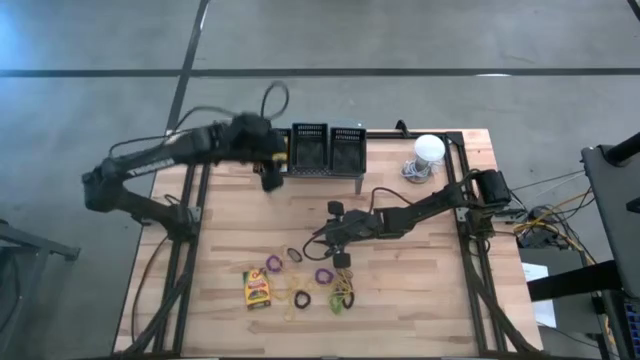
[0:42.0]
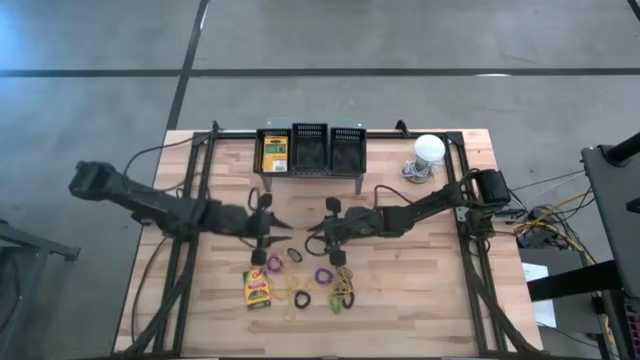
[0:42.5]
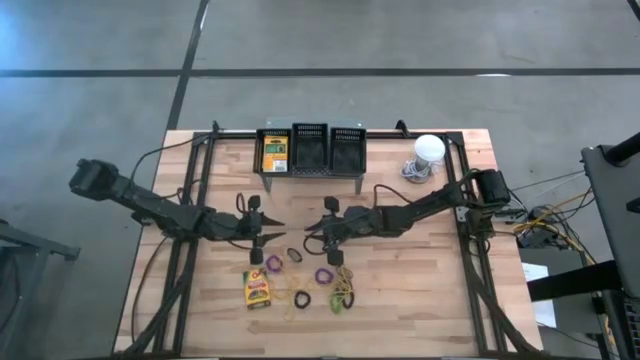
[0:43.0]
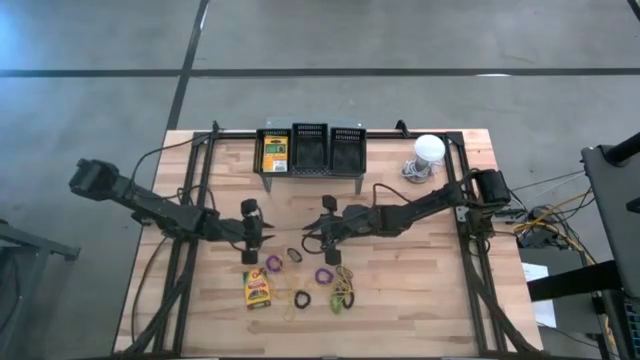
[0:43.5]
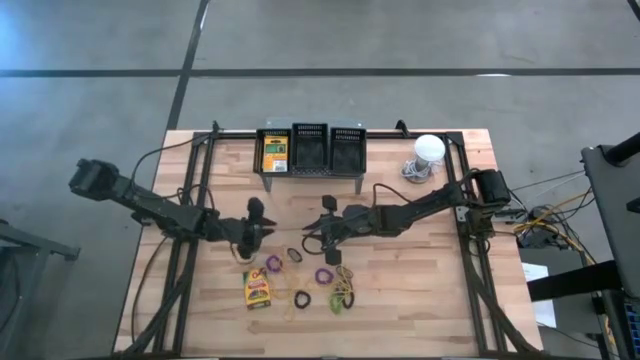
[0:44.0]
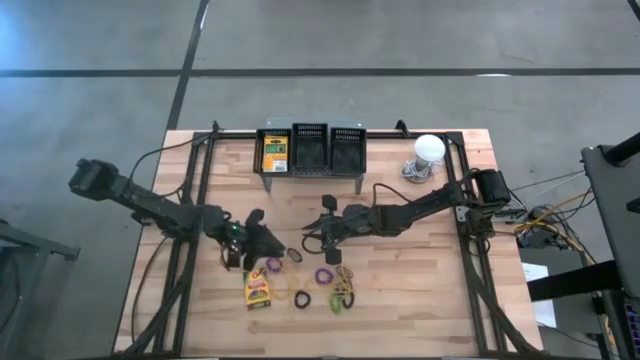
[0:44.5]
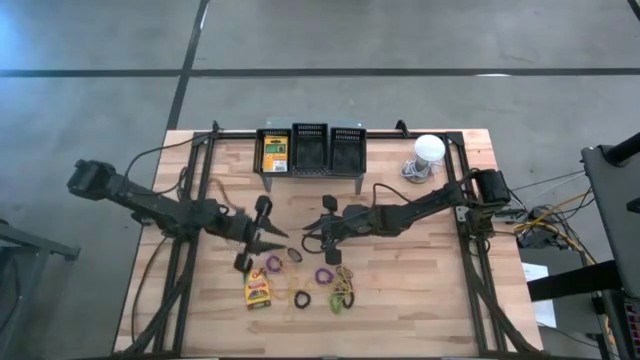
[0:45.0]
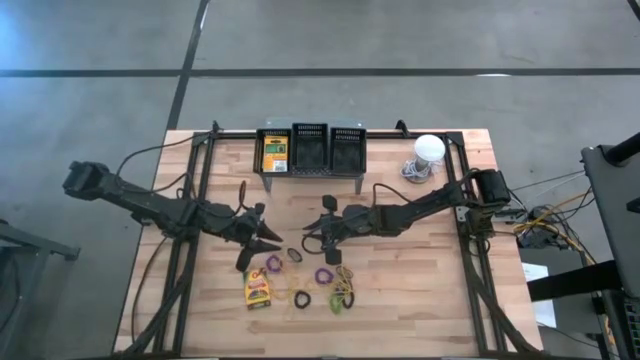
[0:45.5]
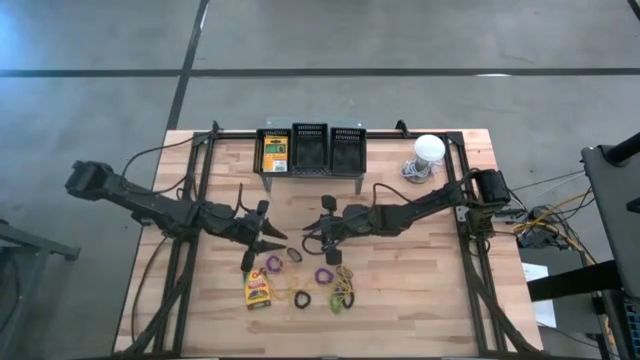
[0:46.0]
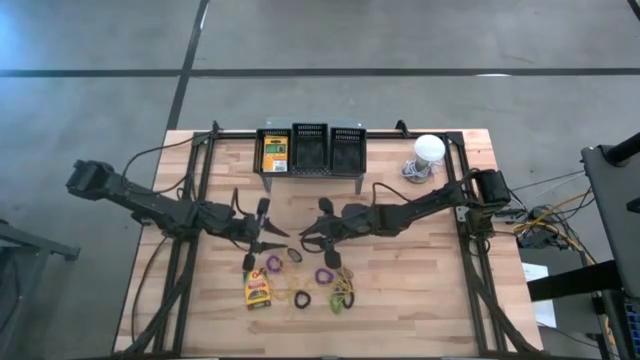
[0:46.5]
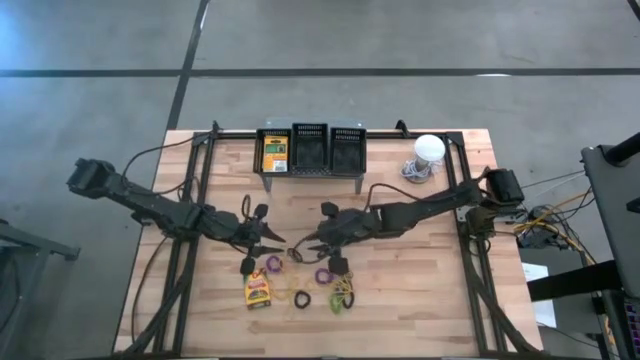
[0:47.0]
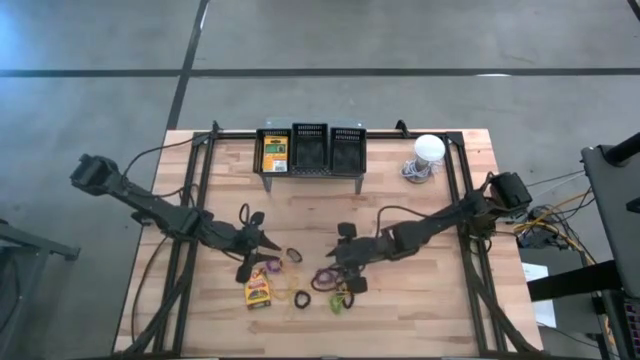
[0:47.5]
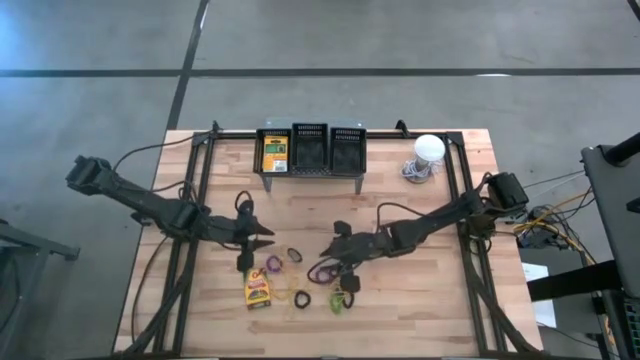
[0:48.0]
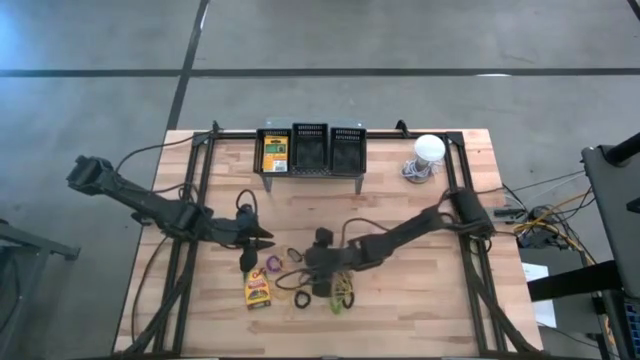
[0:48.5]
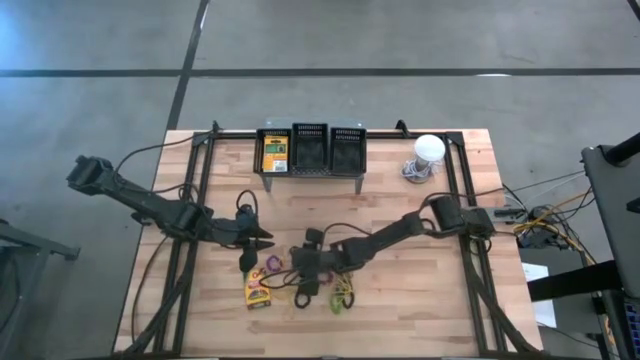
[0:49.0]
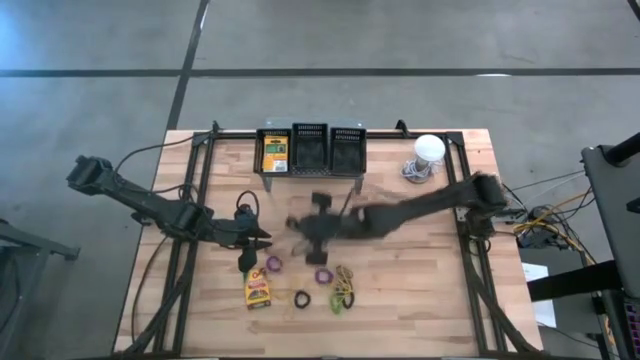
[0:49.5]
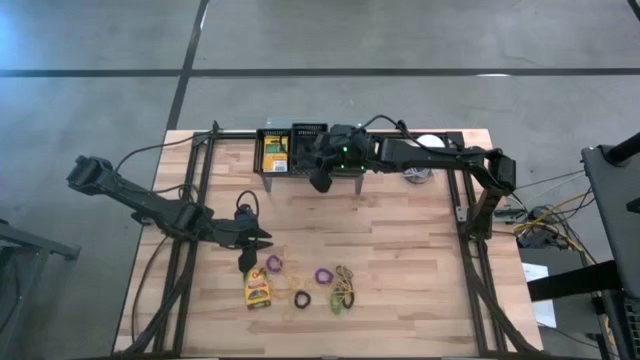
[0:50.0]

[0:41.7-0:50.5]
Task: Pick & Place Office Desk Supplies
Put the black rubber band into the middle black basket

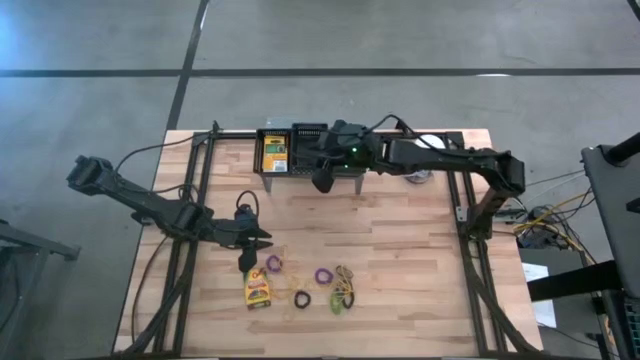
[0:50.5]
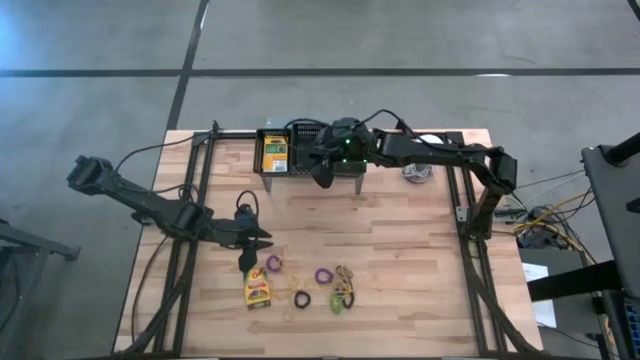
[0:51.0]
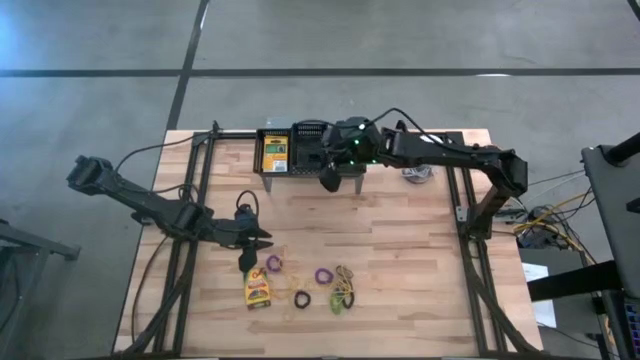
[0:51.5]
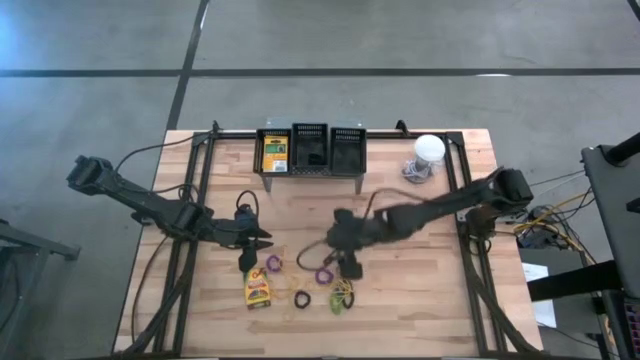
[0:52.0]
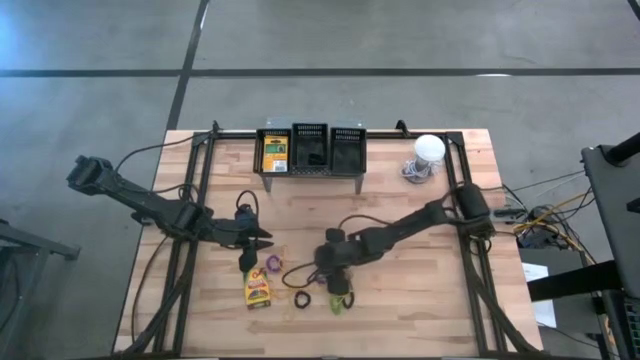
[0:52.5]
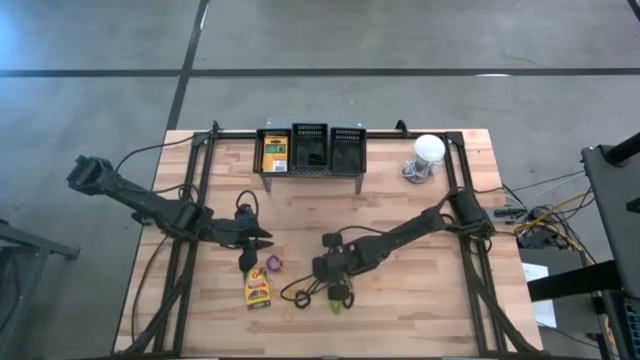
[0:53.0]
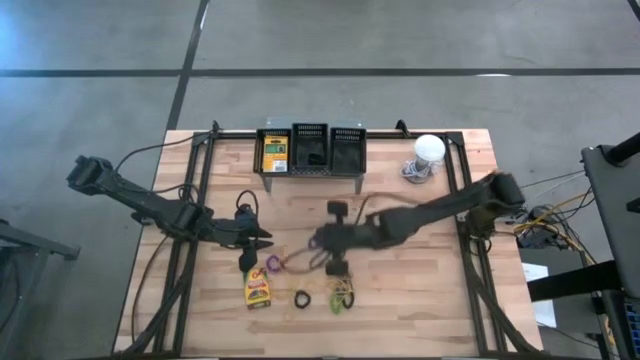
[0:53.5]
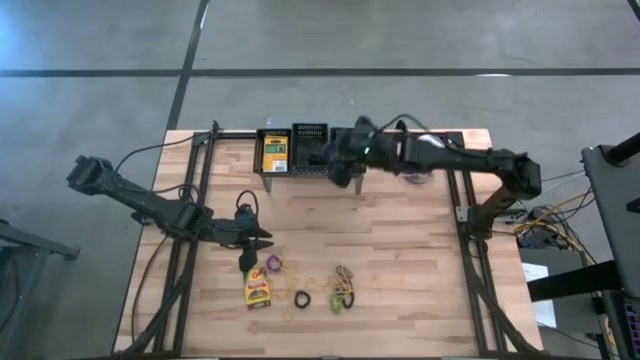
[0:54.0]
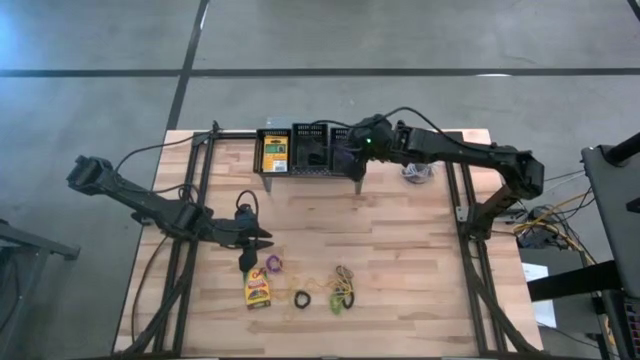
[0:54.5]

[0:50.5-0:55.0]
Put the purple spring keychain into the right black basket

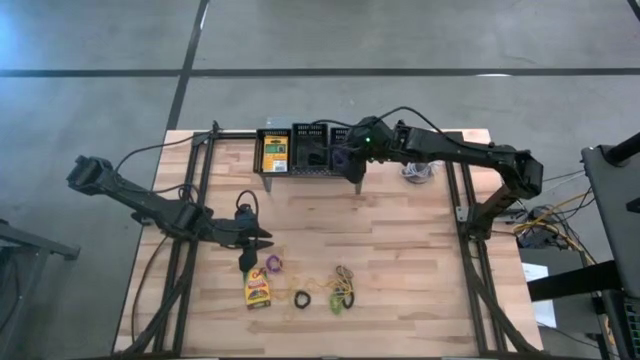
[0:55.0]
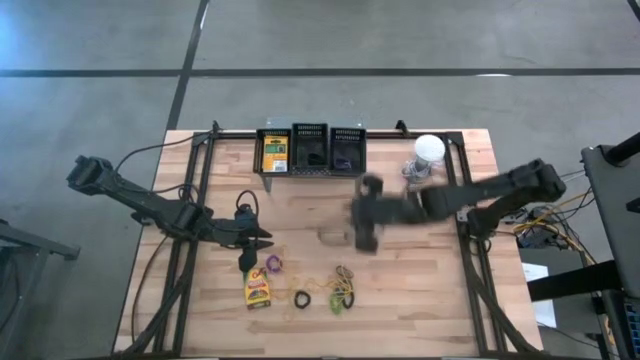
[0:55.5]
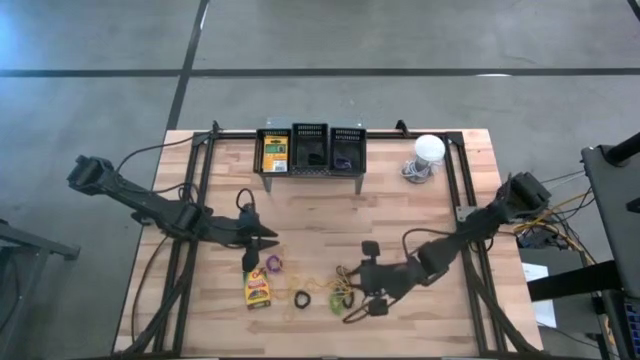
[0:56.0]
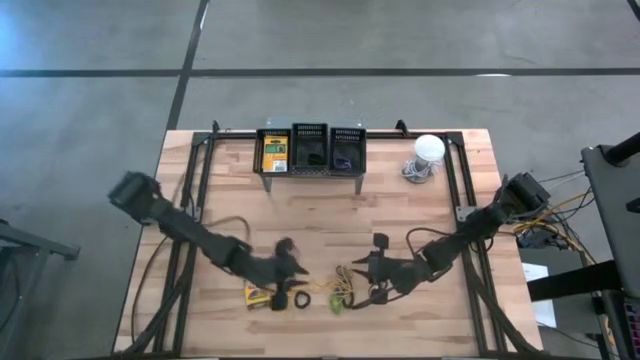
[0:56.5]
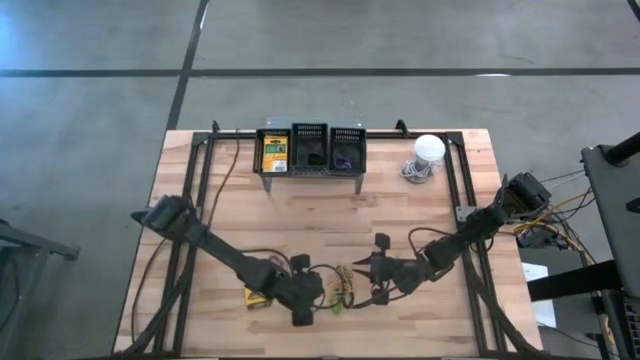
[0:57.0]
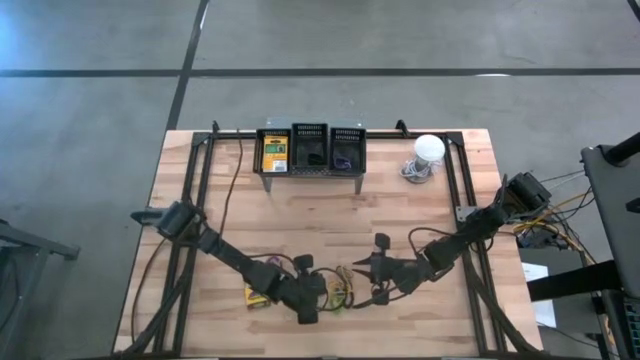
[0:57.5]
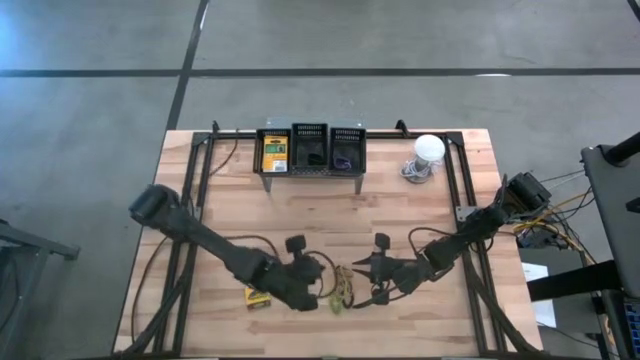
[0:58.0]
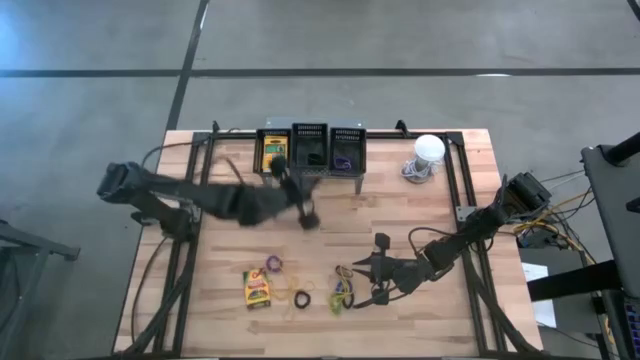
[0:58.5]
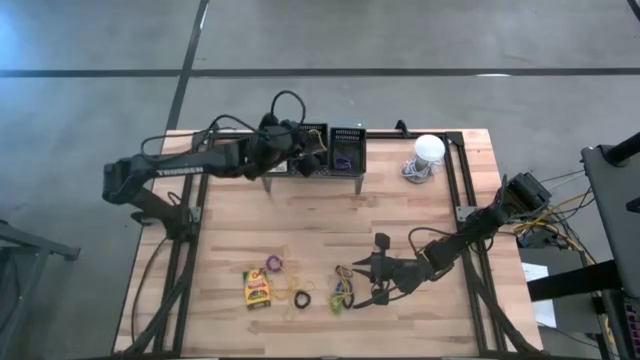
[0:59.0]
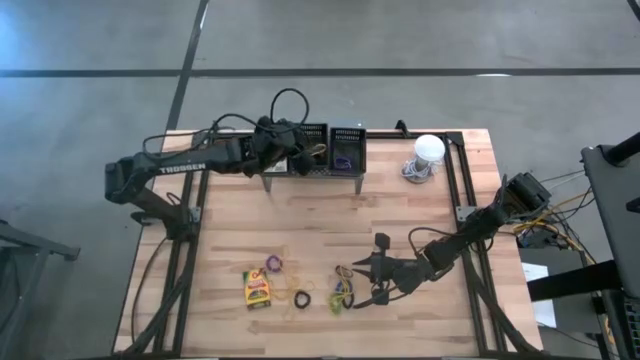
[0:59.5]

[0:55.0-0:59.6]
Put the yellow rubber band into the middle black basket

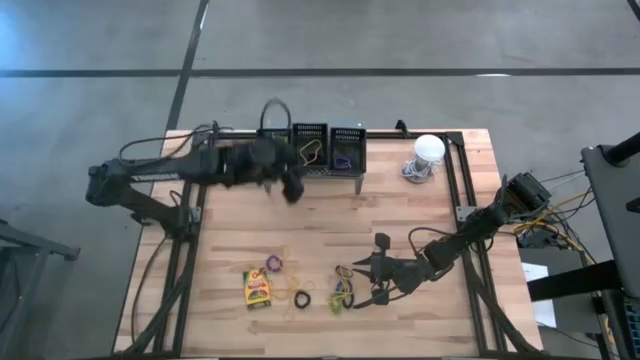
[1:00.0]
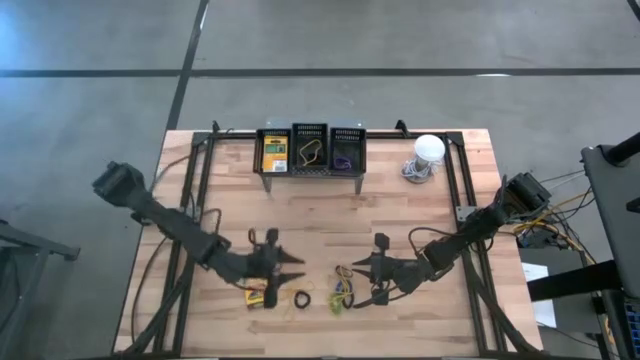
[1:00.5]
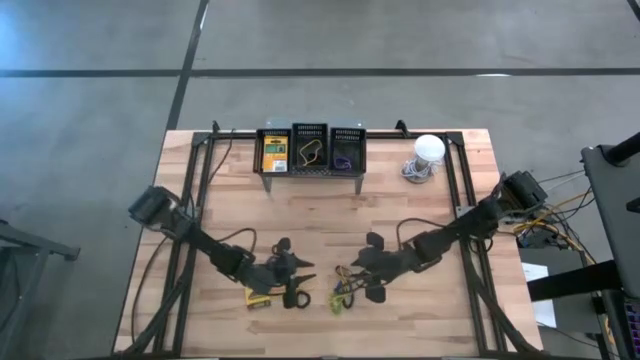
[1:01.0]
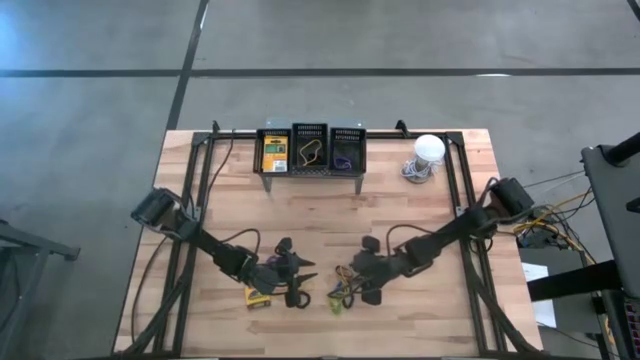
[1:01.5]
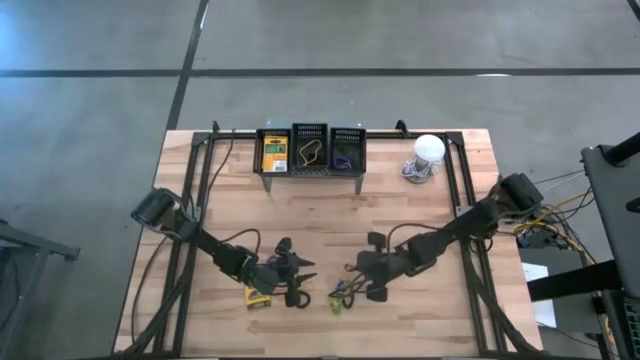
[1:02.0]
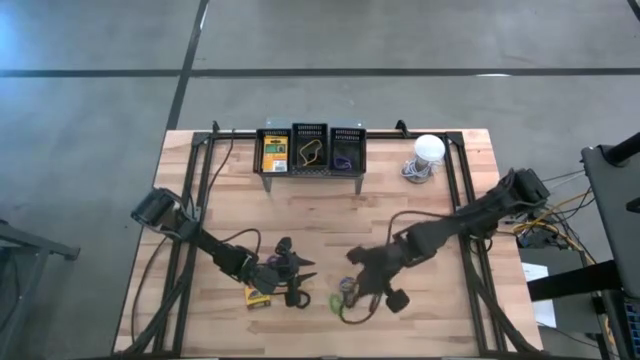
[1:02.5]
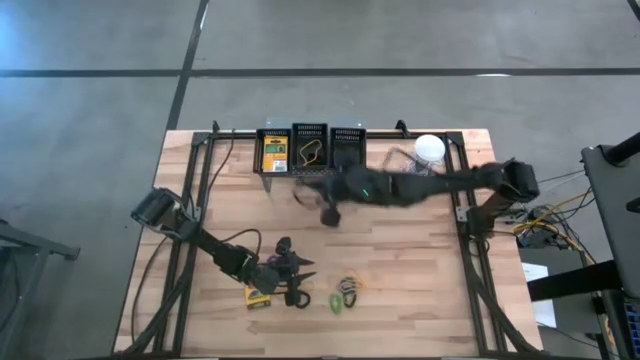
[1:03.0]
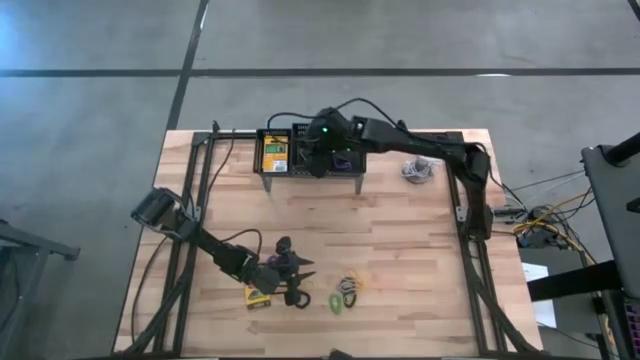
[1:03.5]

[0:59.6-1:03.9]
Put the black rubber band into the middle black basket
